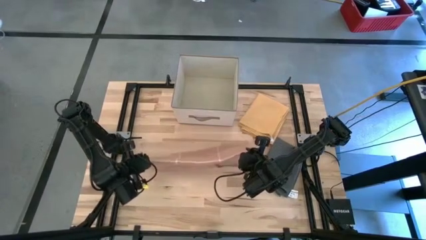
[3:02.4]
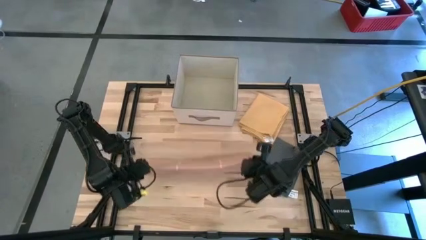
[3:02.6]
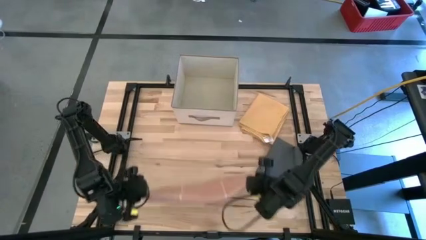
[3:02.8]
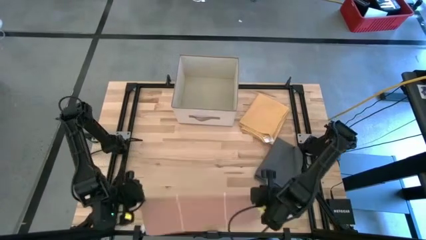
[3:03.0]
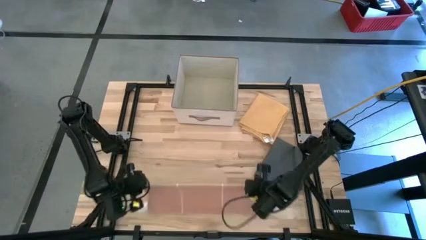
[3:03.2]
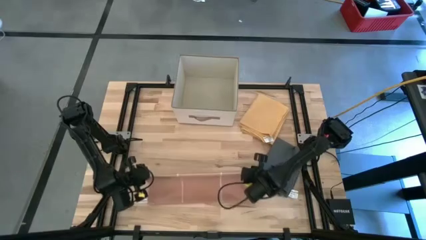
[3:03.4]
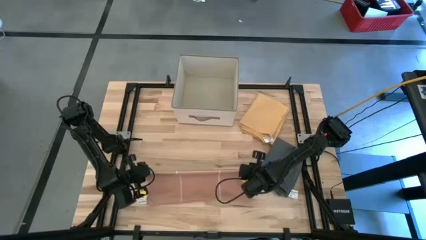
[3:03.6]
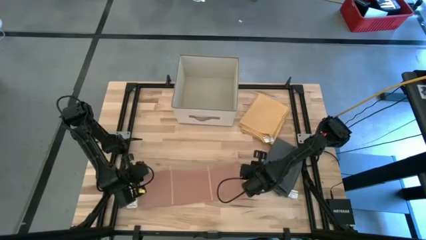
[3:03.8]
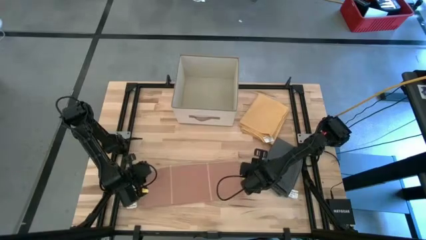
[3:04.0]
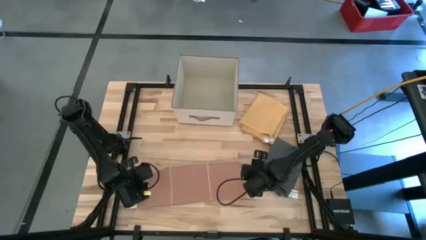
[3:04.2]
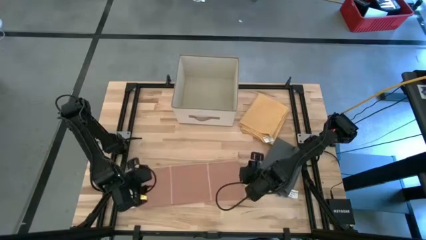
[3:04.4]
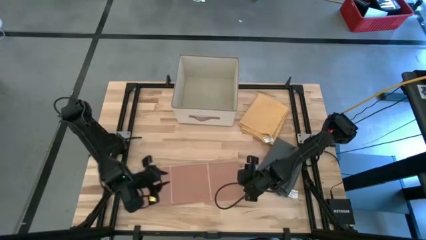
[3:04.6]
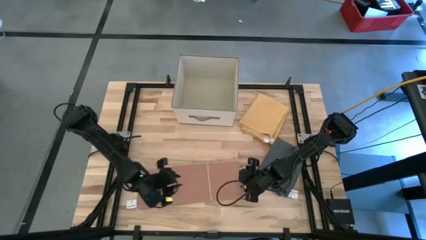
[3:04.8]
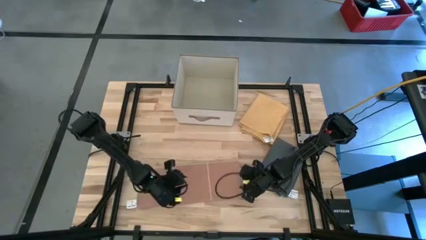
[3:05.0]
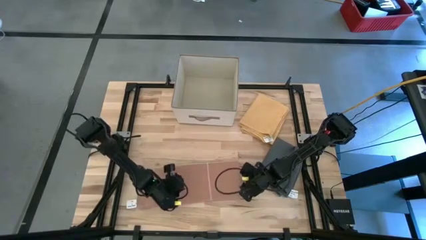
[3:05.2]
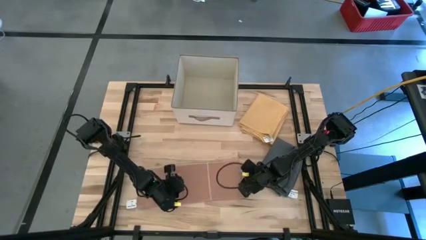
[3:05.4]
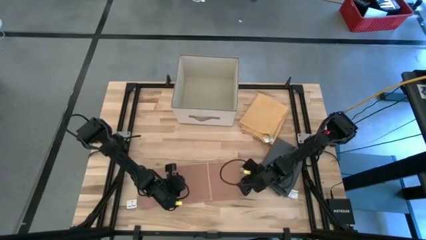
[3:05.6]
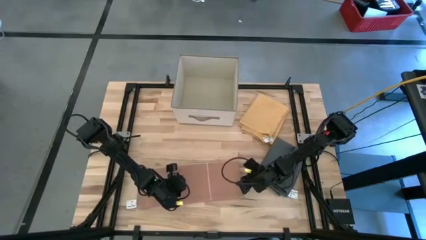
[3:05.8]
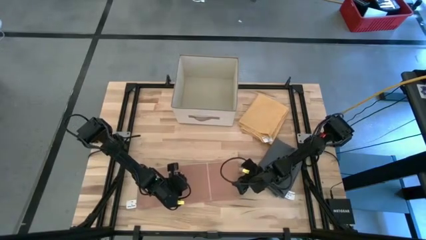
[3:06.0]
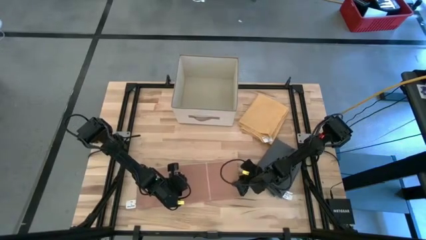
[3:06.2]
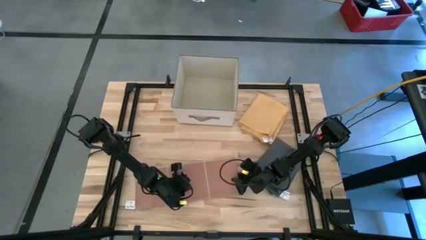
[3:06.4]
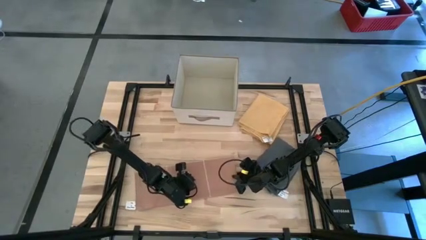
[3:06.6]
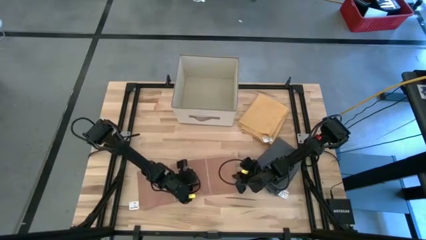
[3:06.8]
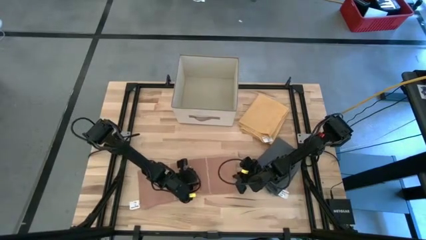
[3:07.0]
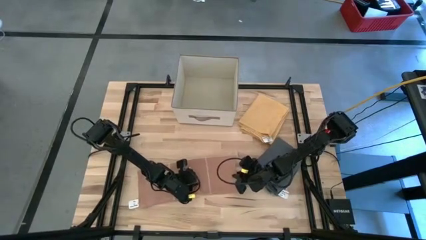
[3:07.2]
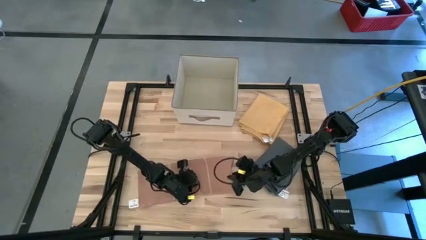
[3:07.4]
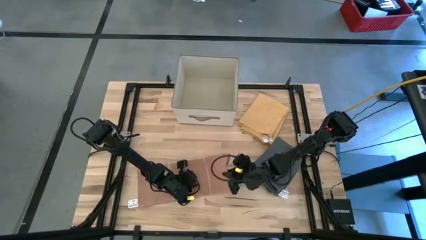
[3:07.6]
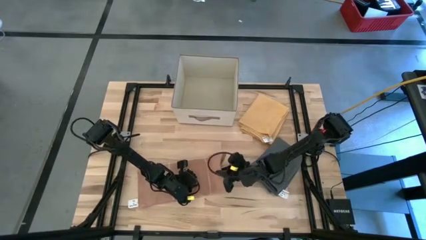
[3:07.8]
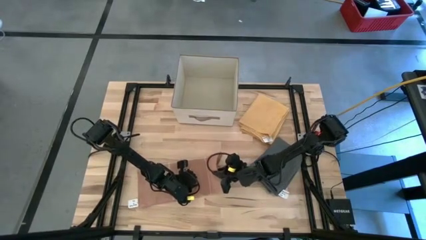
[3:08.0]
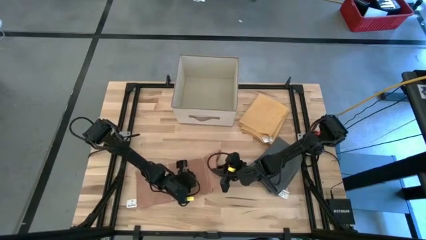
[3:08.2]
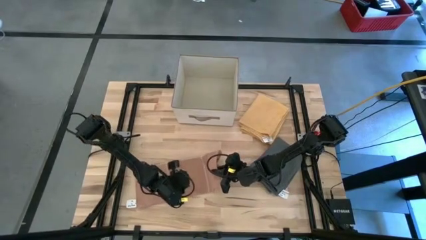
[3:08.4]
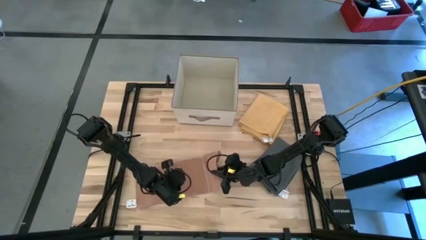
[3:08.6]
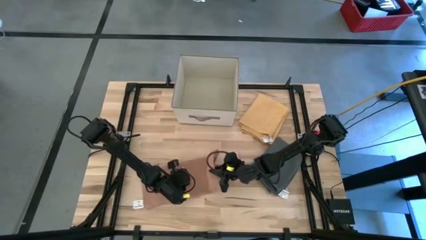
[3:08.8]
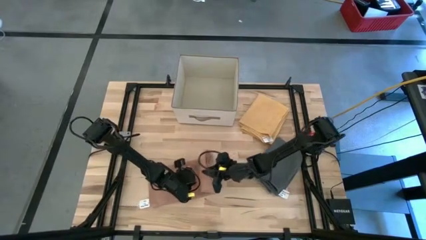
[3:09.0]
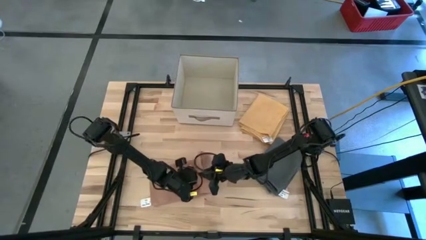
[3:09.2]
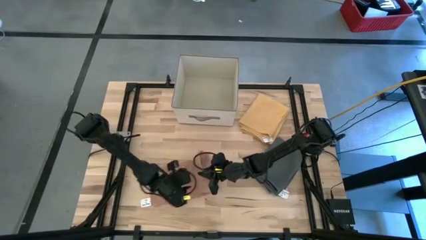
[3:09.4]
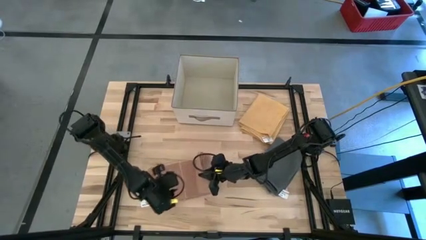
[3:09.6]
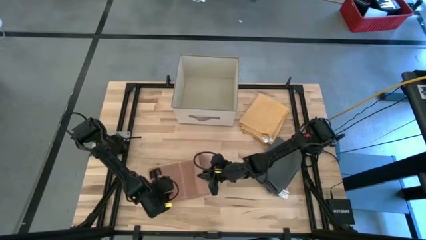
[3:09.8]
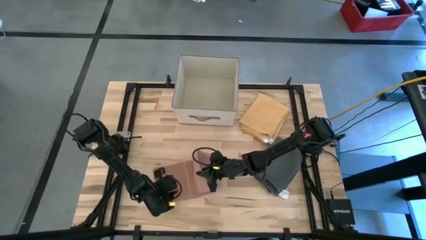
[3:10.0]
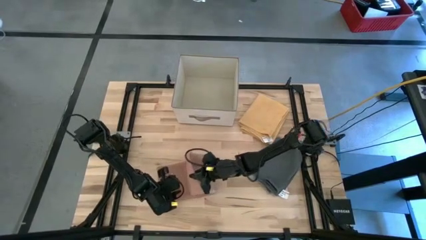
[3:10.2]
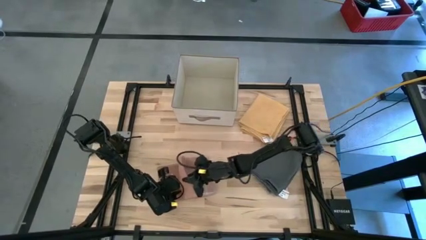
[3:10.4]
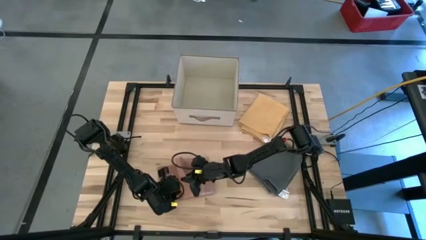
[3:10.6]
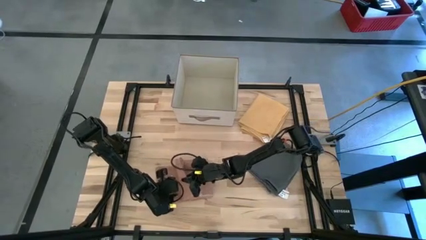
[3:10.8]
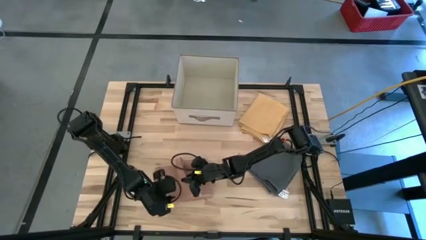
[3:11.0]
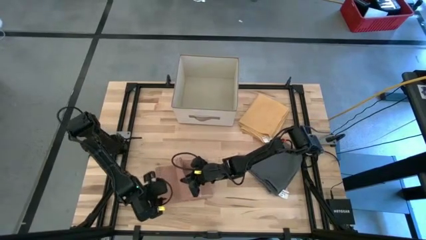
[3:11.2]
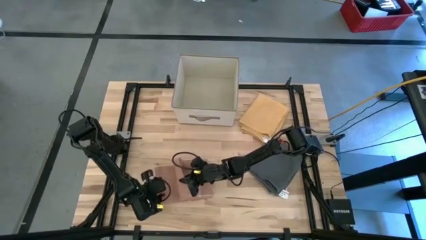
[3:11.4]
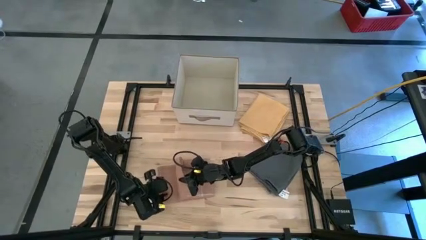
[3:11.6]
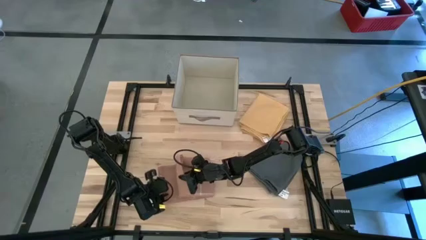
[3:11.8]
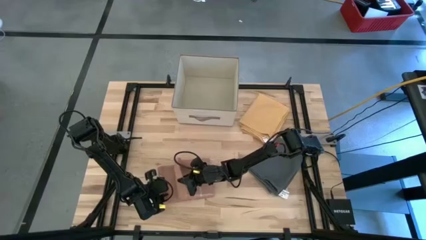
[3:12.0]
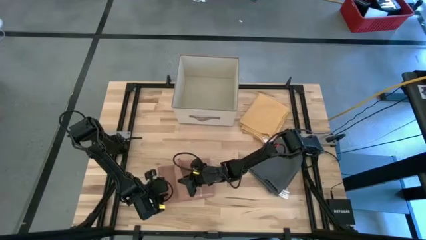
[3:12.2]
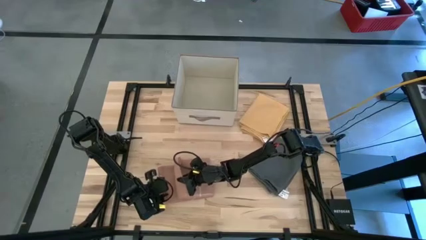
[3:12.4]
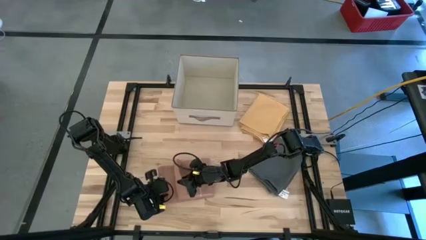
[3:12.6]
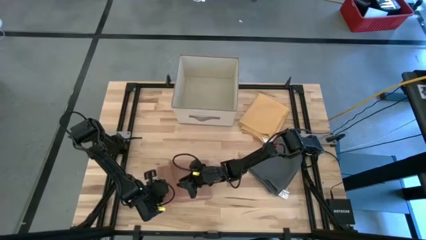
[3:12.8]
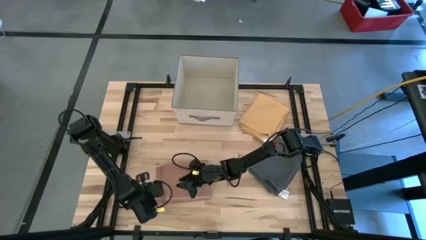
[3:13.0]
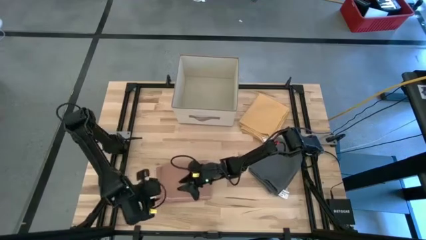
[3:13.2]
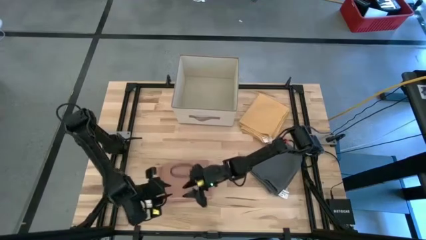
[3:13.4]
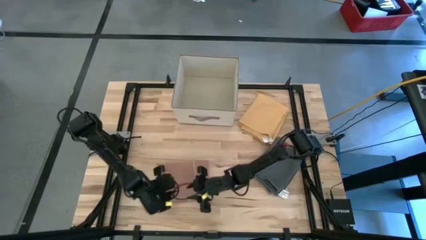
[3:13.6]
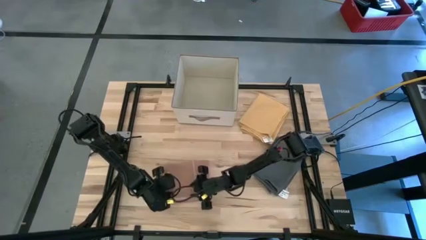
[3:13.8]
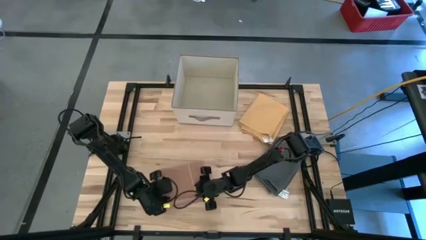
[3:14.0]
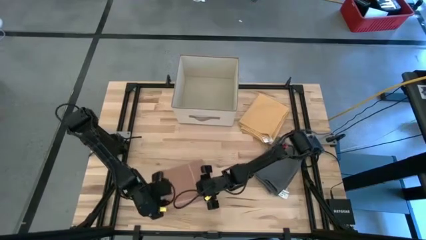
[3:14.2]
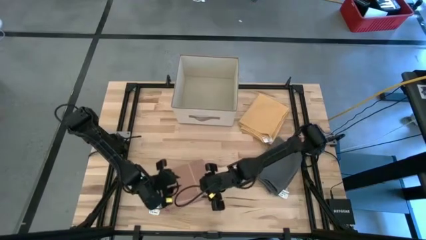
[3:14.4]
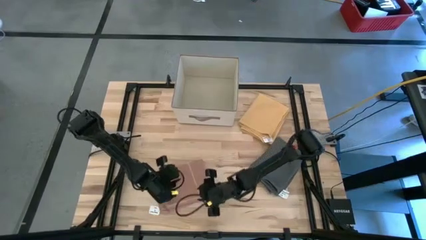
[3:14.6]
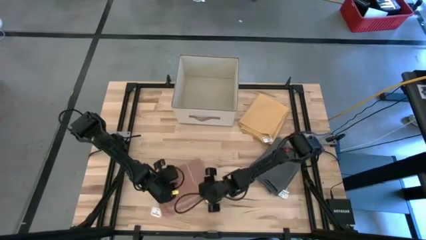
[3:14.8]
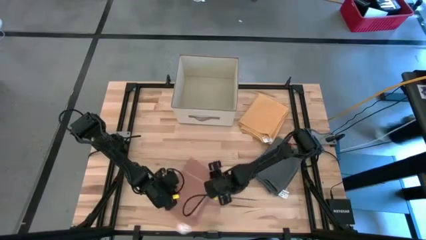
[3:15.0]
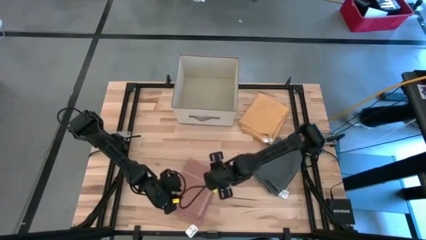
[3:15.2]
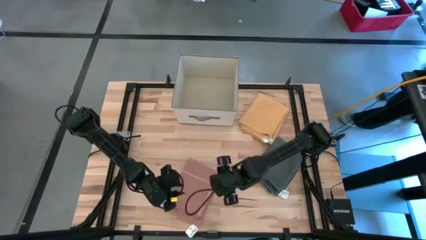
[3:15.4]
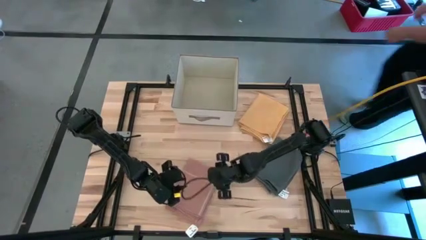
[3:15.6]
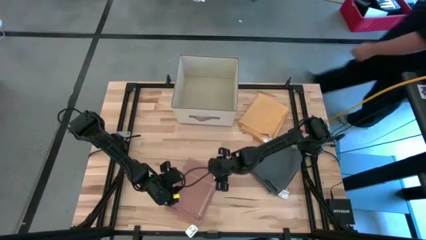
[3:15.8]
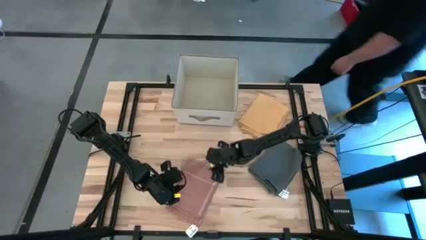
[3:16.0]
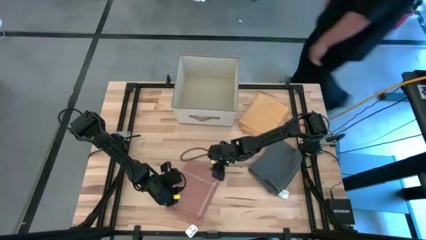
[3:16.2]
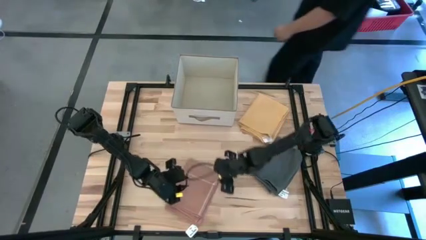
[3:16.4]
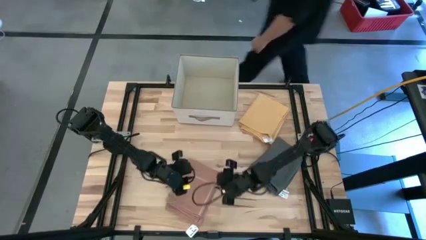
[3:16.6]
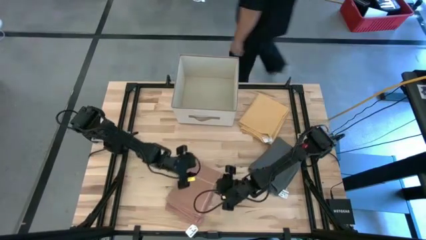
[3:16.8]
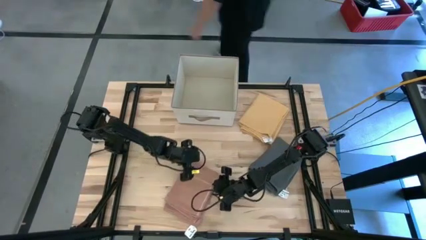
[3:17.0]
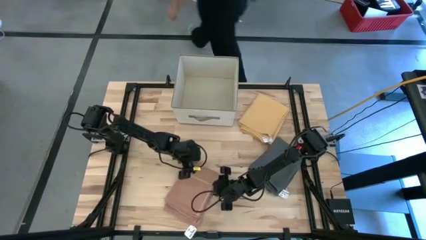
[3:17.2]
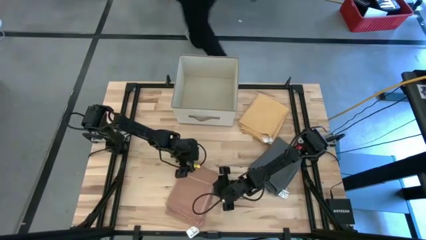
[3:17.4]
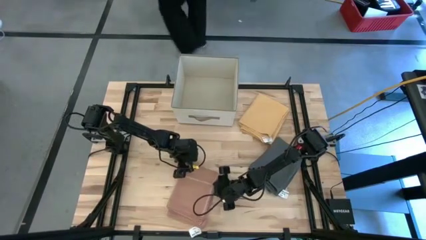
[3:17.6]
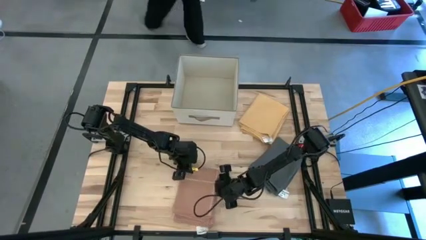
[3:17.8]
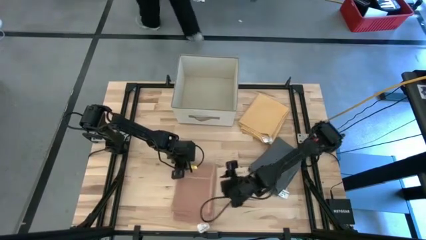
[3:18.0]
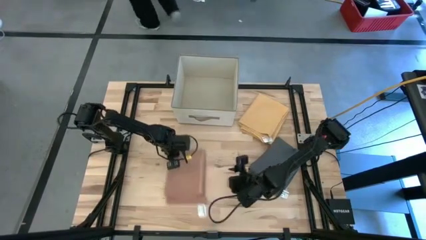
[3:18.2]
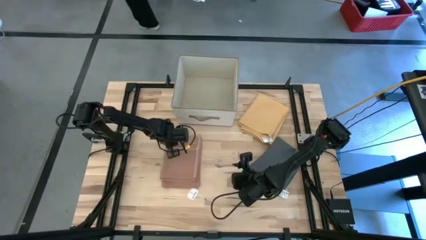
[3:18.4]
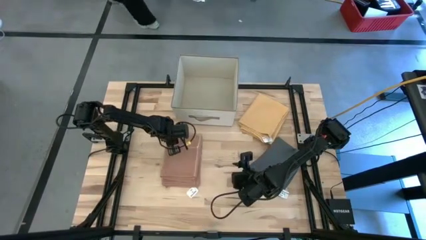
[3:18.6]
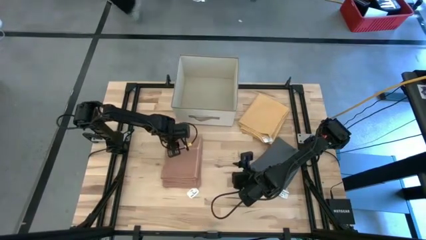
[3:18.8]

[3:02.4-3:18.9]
Task: Fold towel
Fold the brown towel
